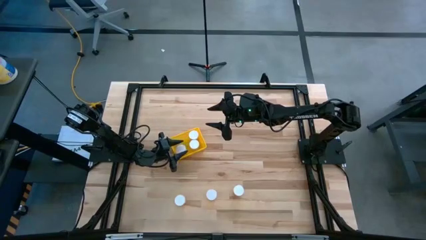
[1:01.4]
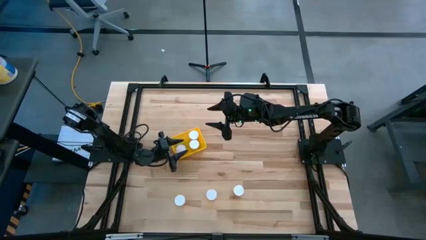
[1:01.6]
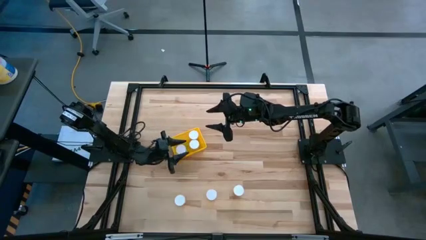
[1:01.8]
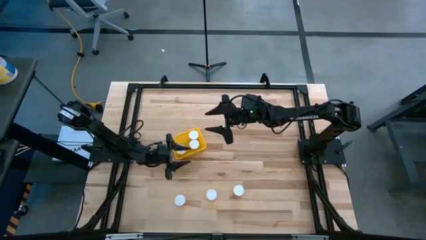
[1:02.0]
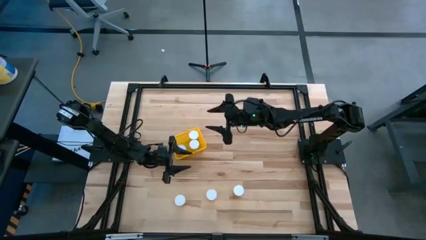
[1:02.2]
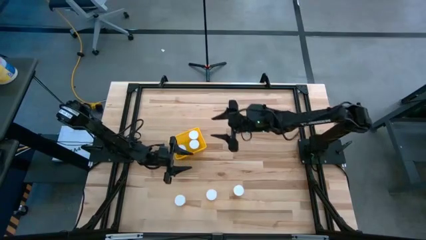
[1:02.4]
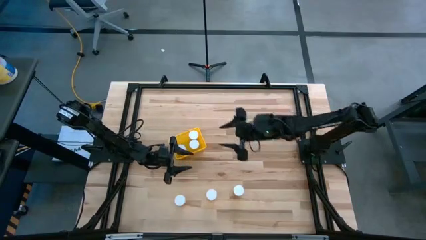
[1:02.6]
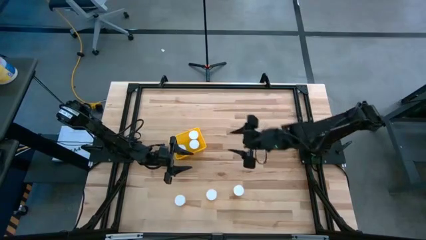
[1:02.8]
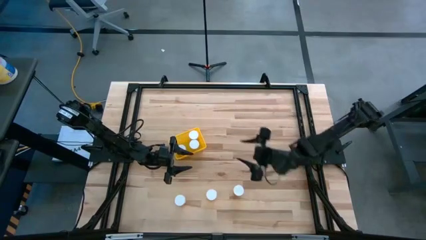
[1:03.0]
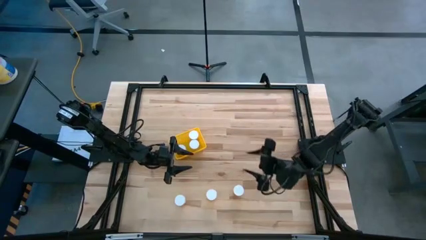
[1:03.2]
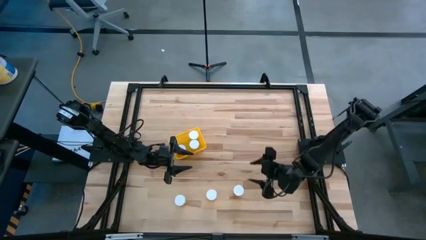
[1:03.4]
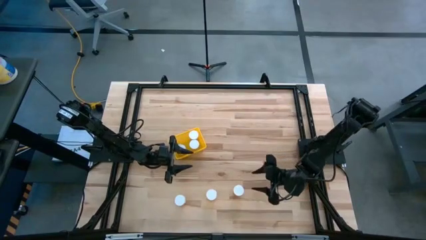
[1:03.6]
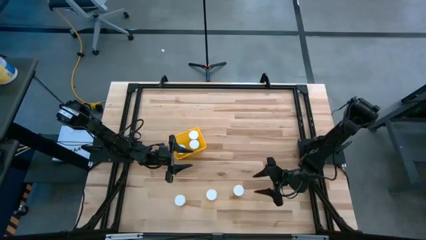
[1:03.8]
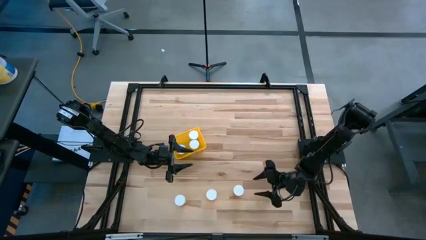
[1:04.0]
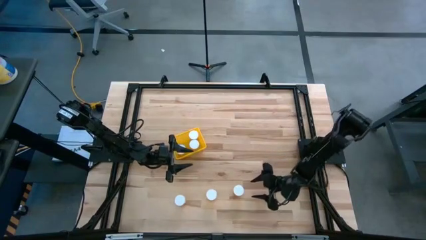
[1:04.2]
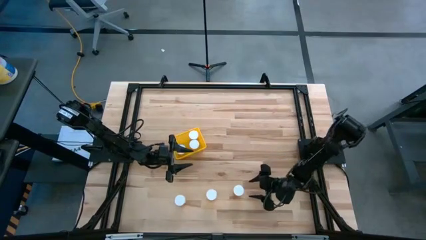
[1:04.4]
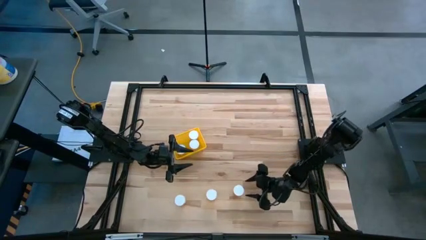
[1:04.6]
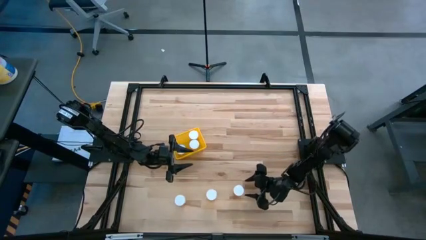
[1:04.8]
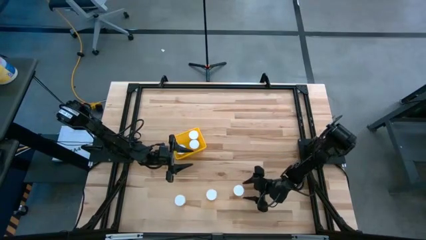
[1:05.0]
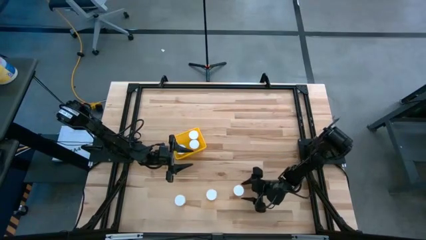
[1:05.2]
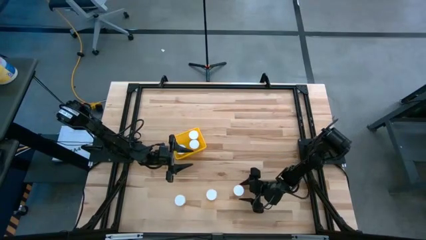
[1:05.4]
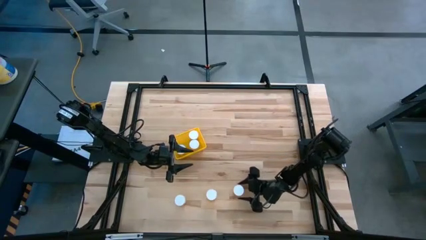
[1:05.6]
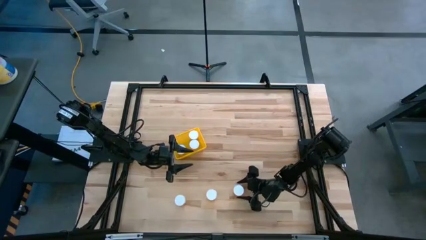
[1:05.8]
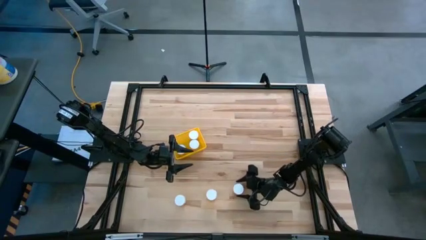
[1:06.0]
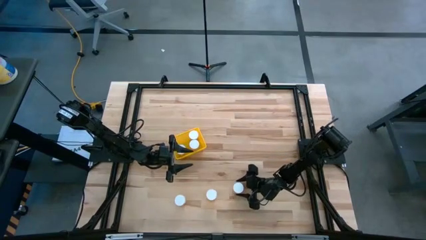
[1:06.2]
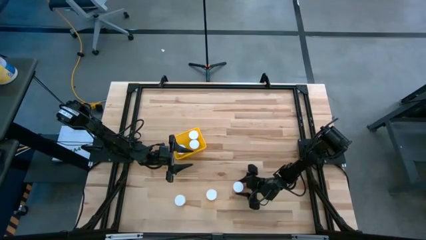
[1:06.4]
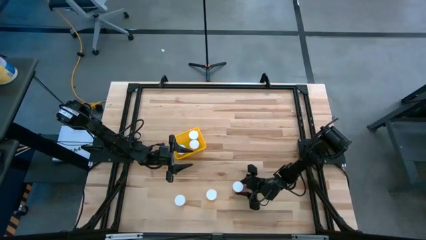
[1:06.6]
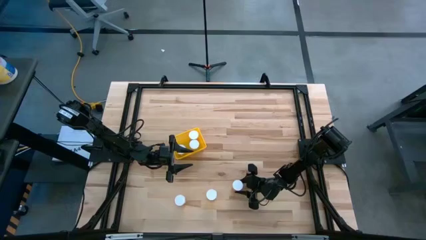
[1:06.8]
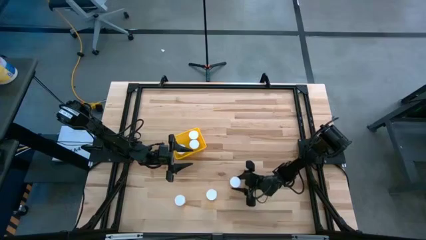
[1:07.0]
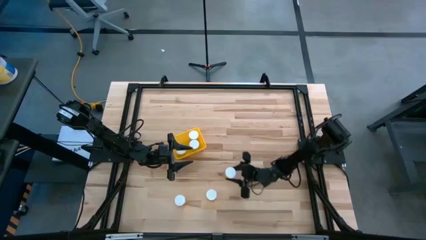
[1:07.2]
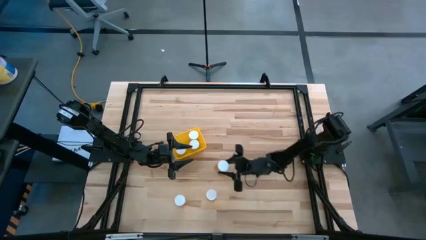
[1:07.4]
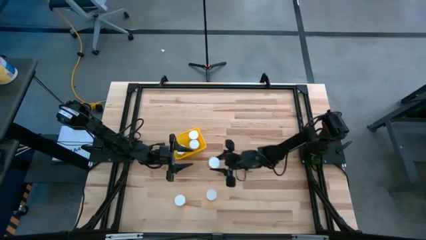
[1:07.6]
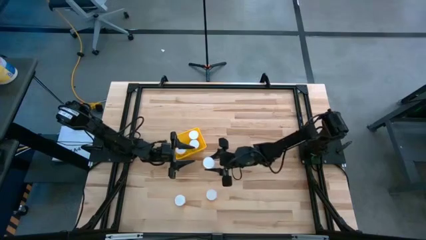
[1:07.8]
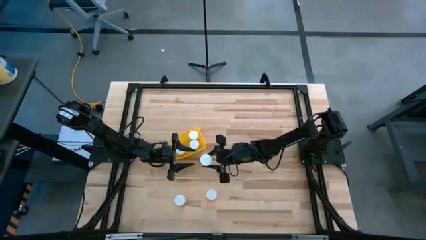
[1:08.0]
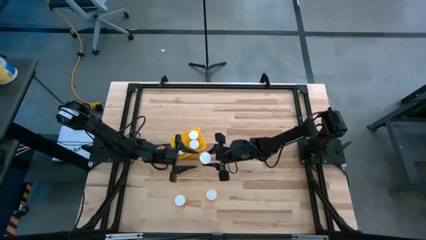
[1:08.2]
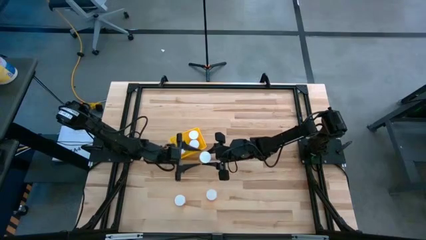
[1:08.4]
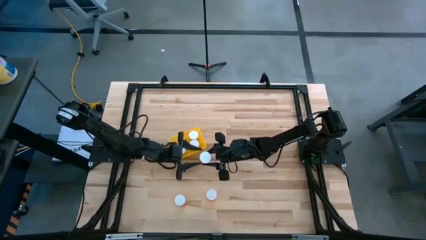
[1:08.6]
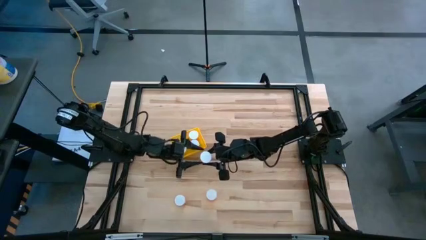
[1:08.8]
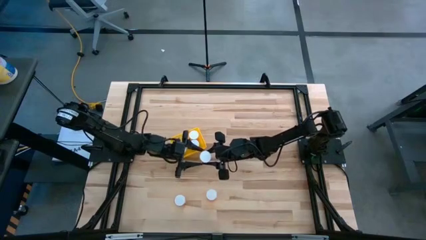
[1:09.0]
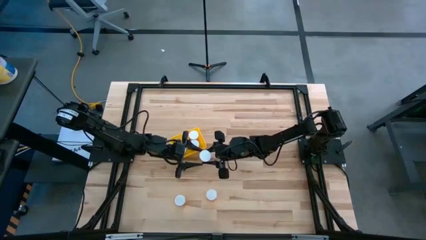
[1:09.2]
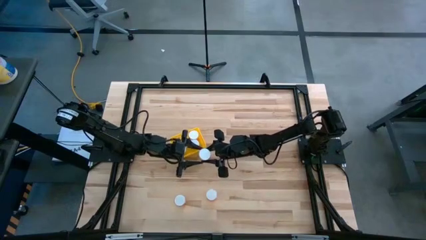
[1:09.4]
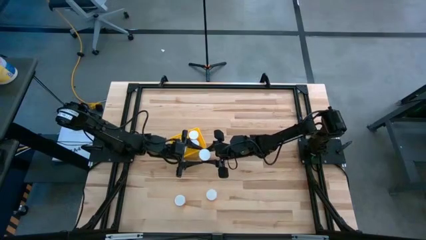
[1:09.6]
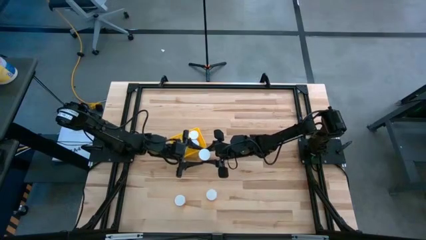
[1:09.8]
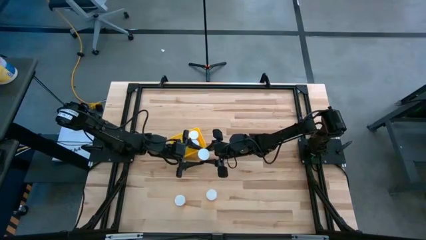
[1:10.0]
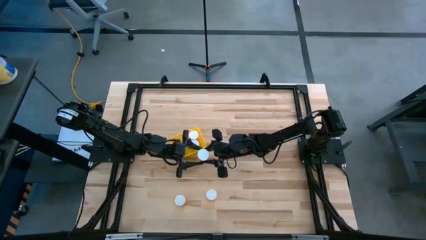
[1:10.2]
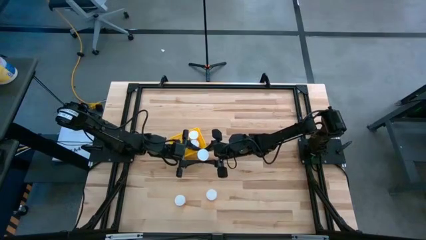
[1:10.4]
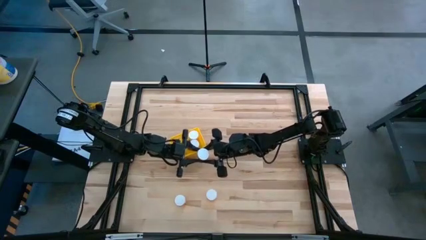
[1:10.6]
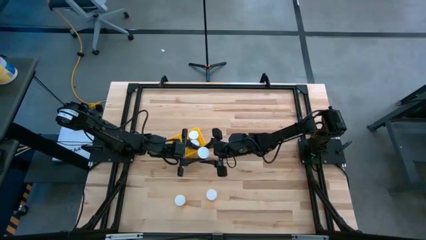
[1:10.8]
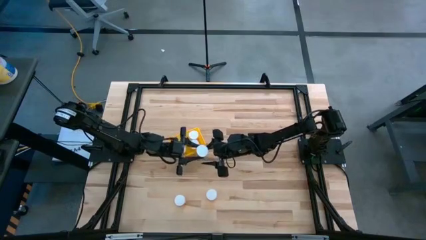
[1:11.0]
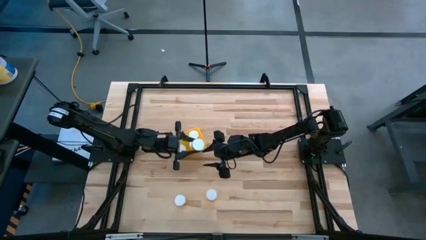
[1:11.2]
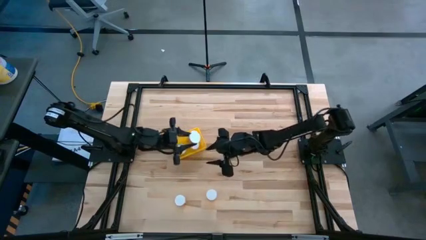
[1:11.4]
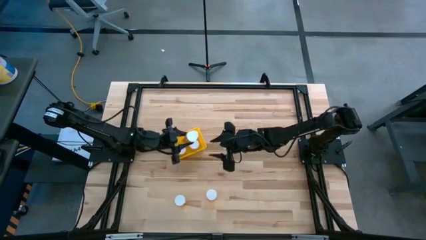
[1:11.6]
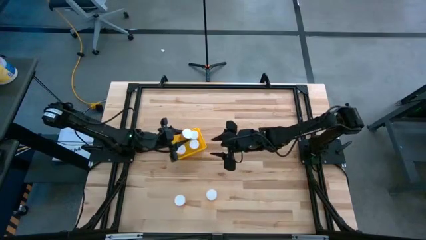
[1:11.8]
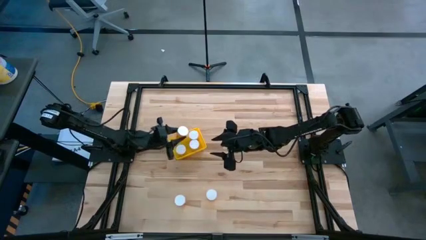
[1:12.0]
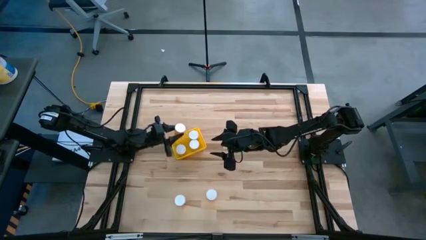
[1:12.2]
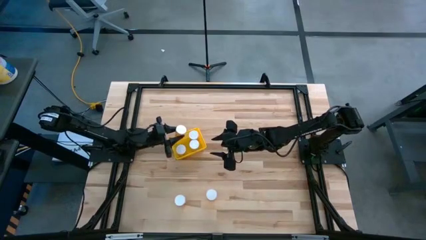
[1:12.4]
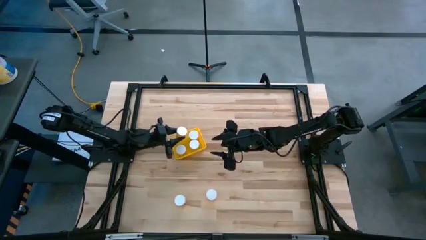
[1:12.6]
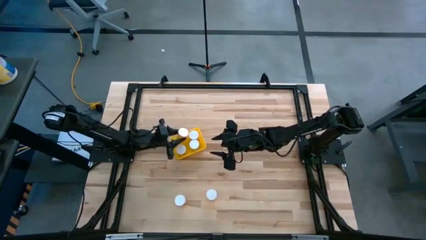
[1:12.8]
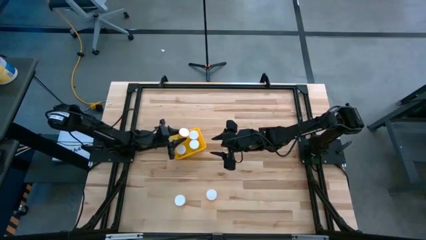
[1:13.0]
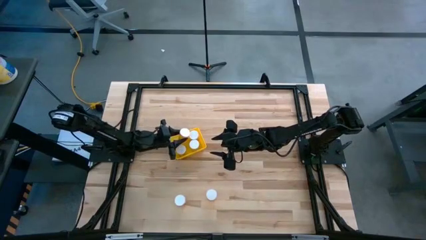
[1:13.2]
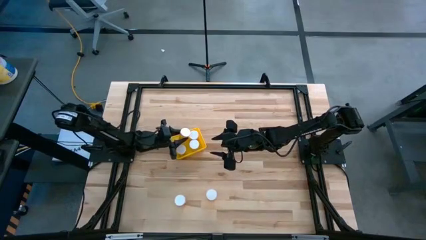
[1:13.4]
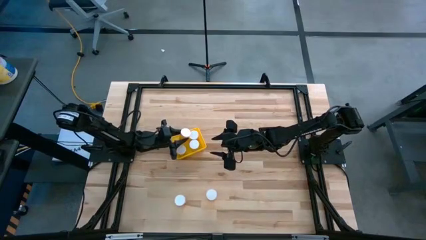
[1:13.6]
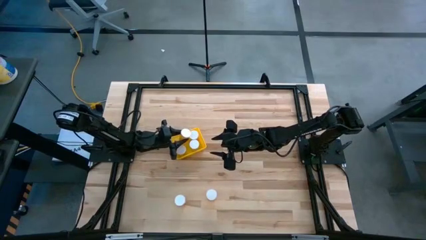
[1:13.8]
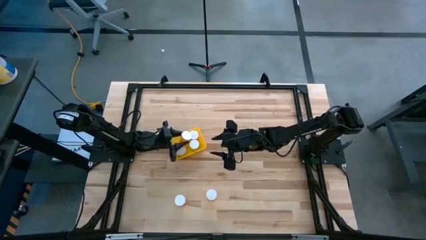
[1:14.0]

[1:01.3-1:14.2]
Task: Pick and place pill bottles into a basket
Put the orange pill bottle into the yellow basket
